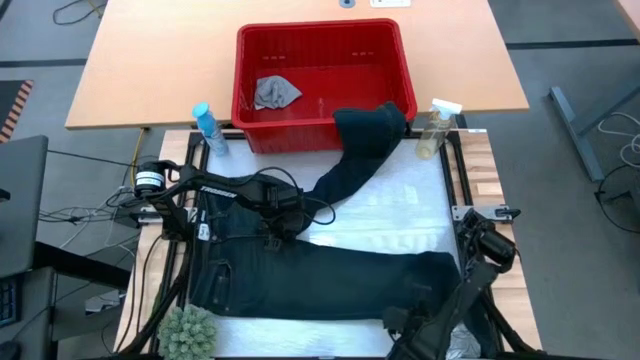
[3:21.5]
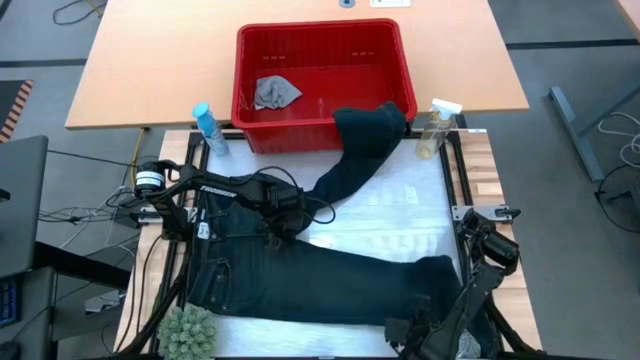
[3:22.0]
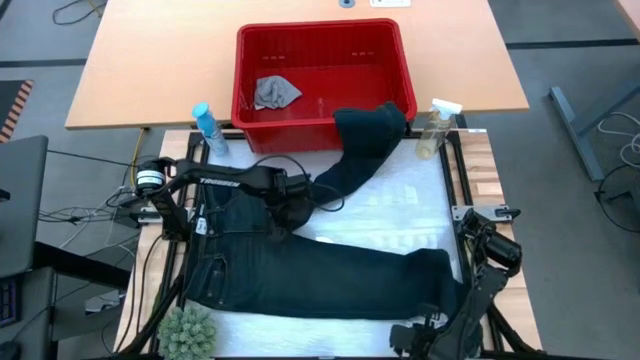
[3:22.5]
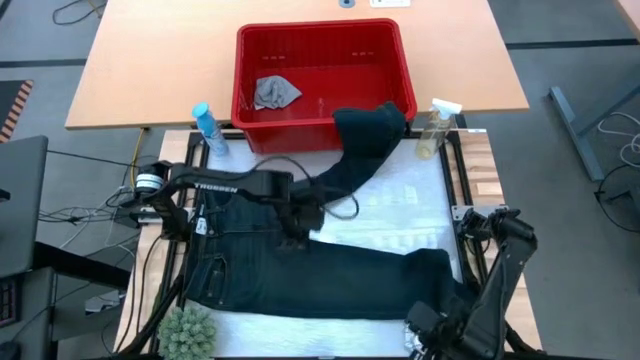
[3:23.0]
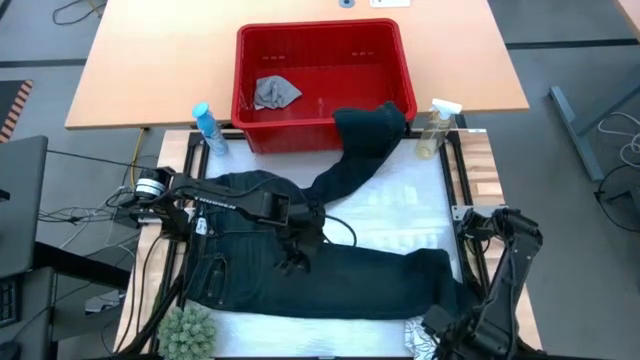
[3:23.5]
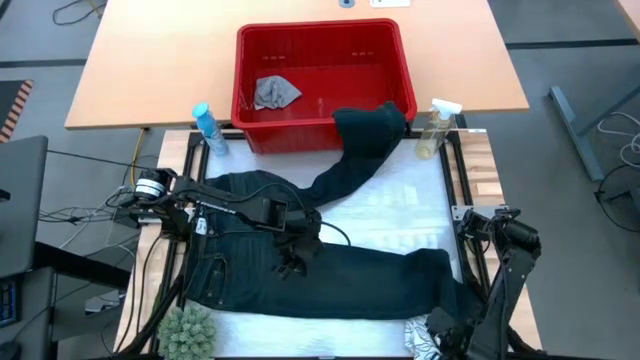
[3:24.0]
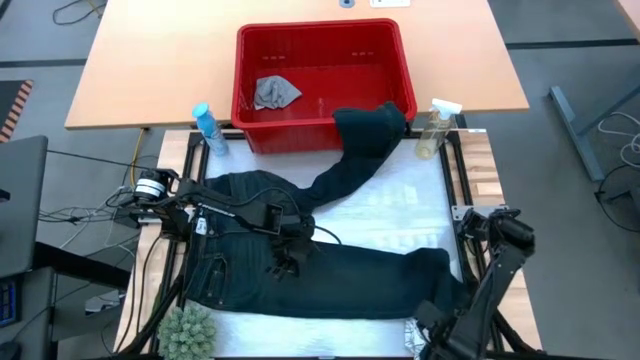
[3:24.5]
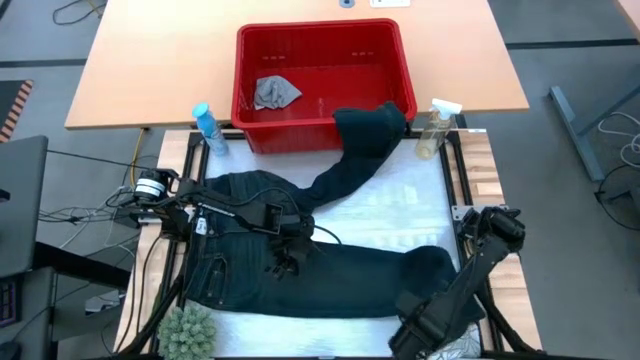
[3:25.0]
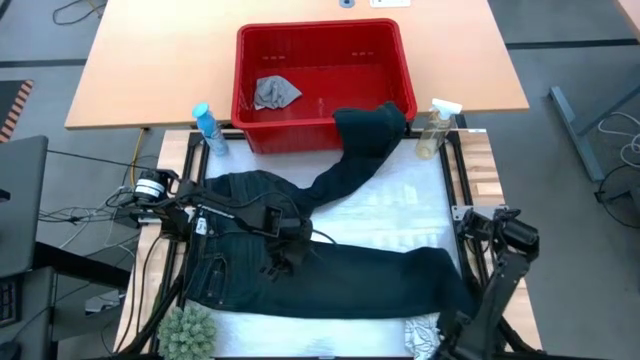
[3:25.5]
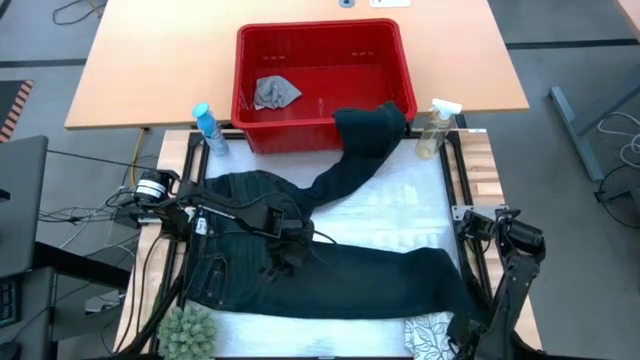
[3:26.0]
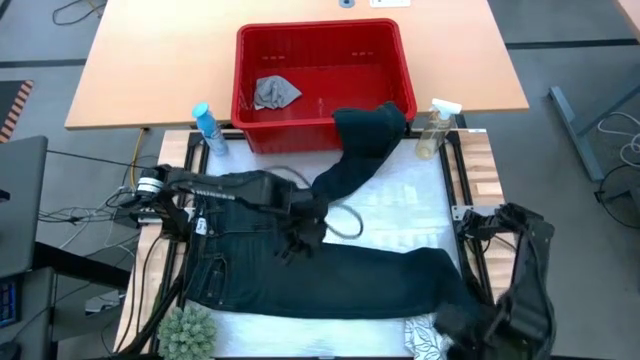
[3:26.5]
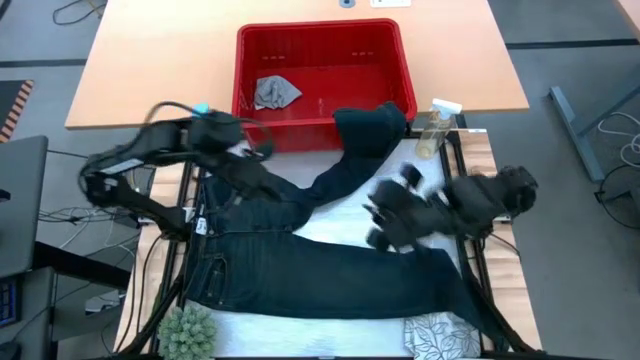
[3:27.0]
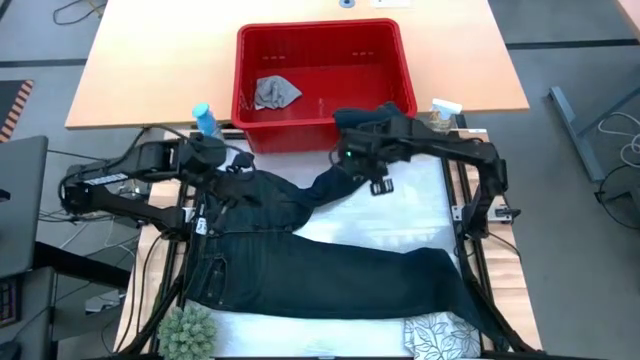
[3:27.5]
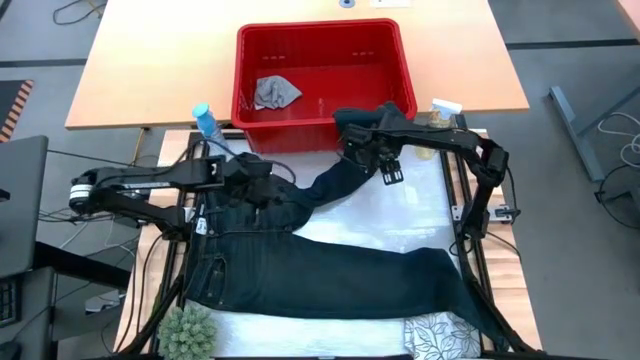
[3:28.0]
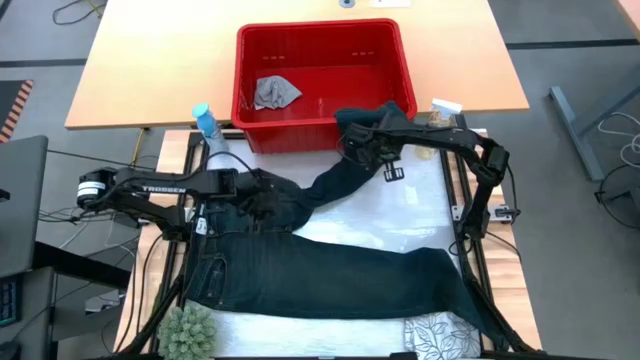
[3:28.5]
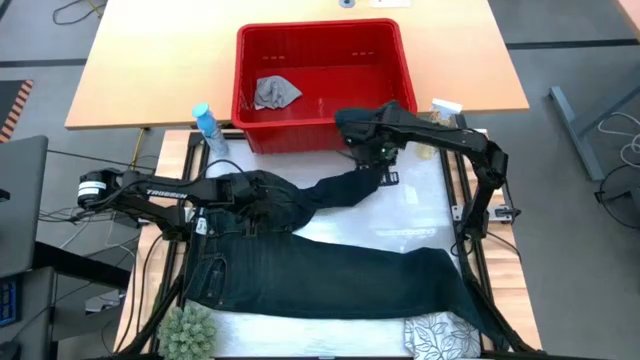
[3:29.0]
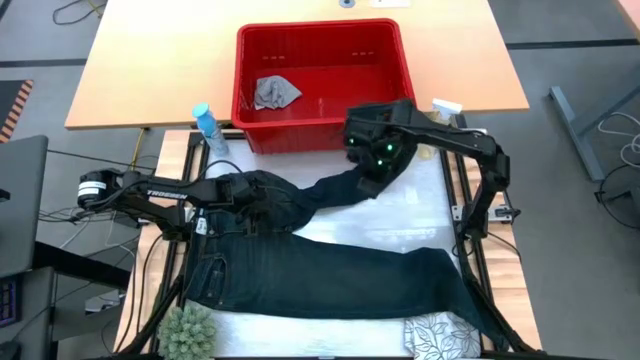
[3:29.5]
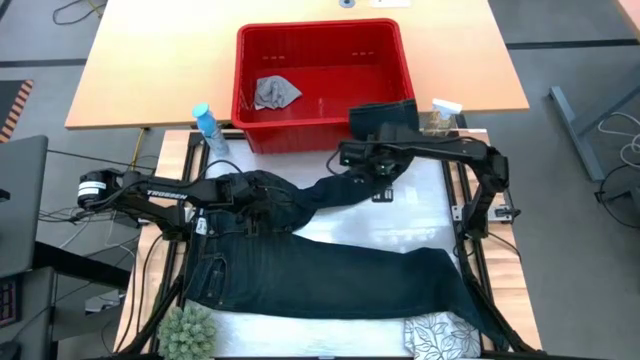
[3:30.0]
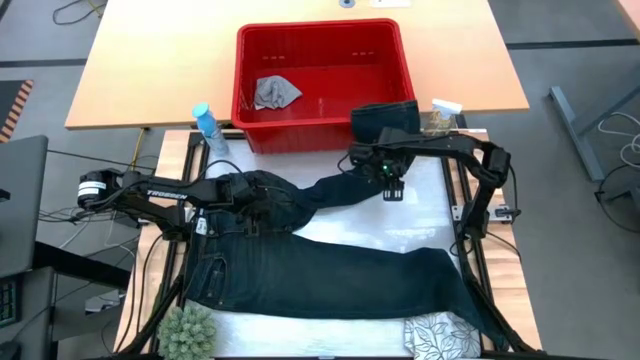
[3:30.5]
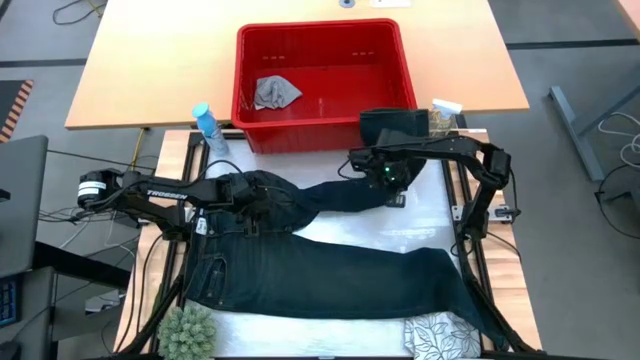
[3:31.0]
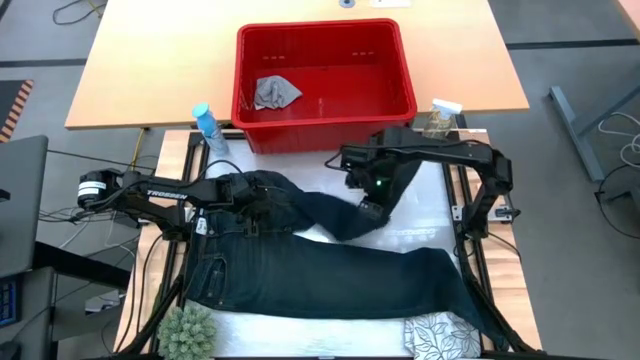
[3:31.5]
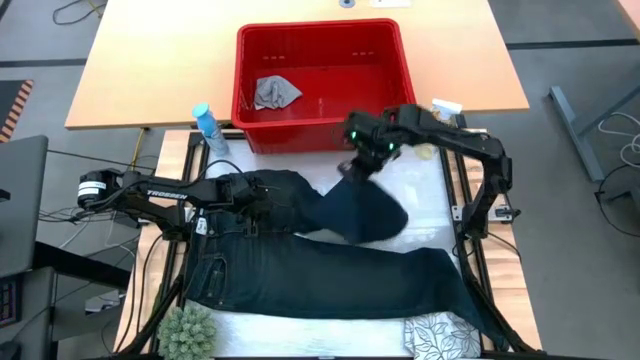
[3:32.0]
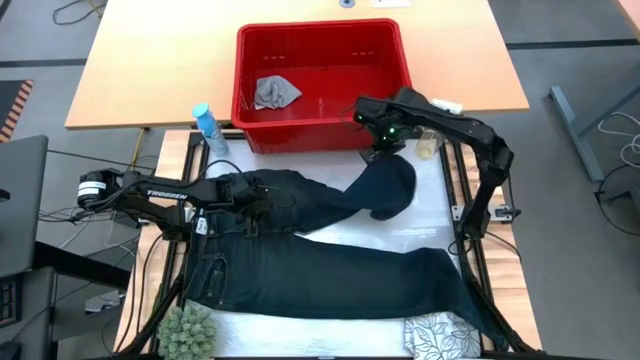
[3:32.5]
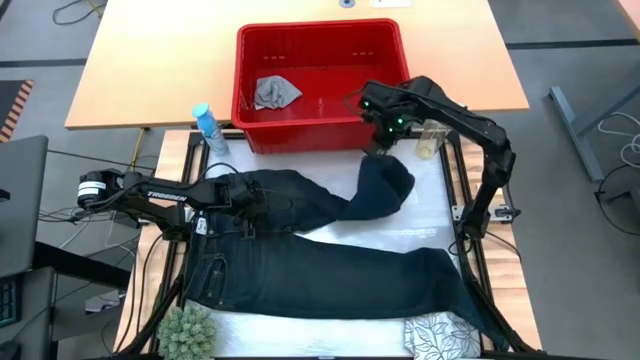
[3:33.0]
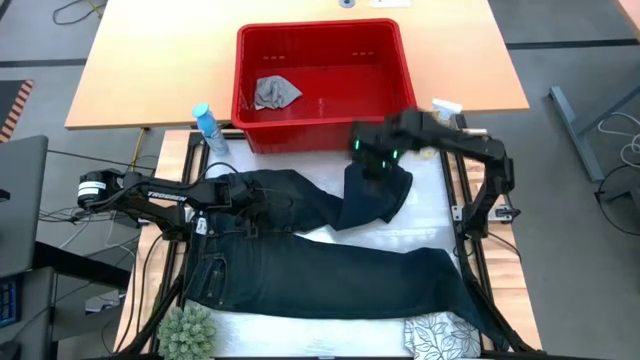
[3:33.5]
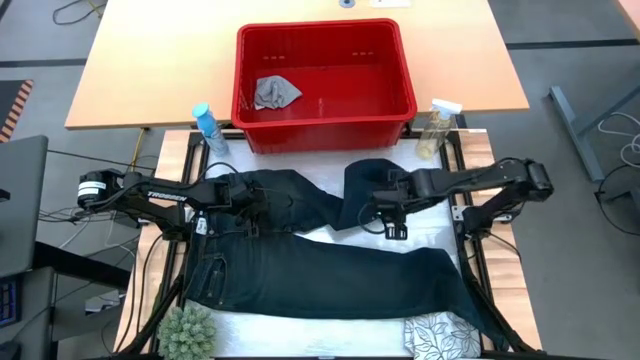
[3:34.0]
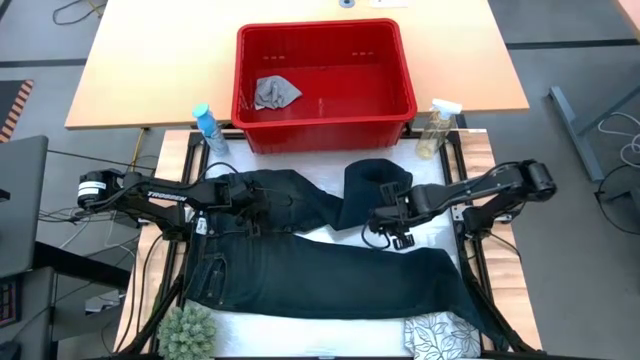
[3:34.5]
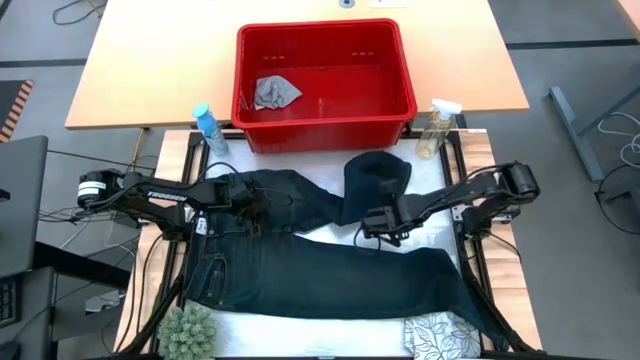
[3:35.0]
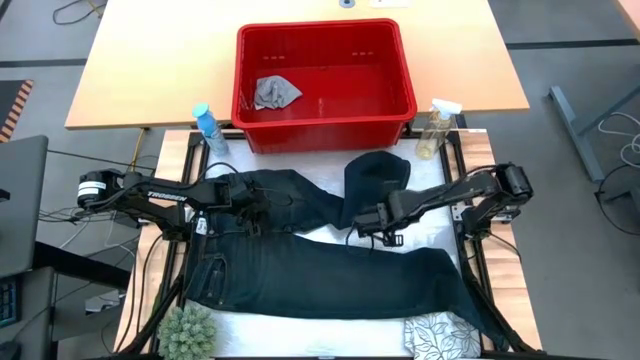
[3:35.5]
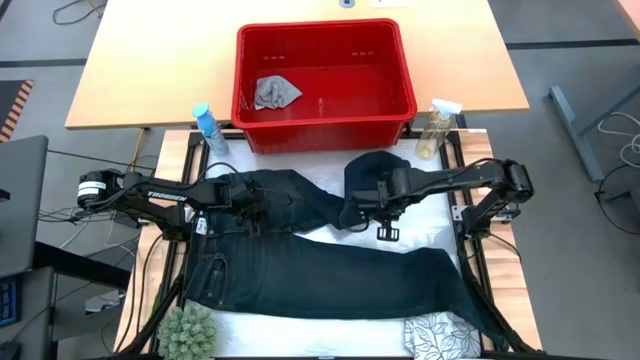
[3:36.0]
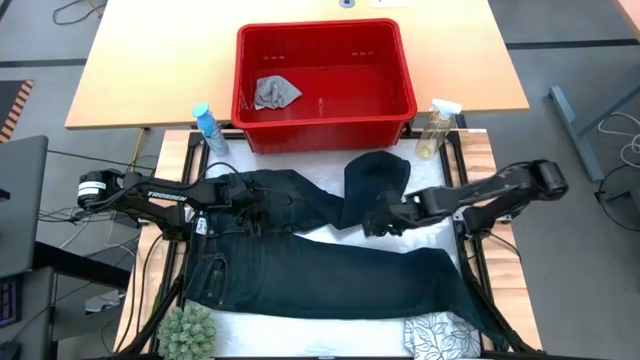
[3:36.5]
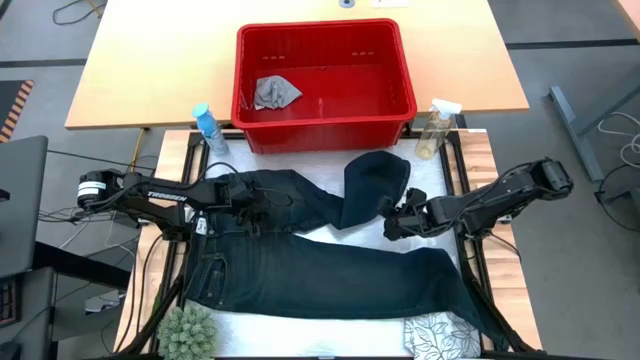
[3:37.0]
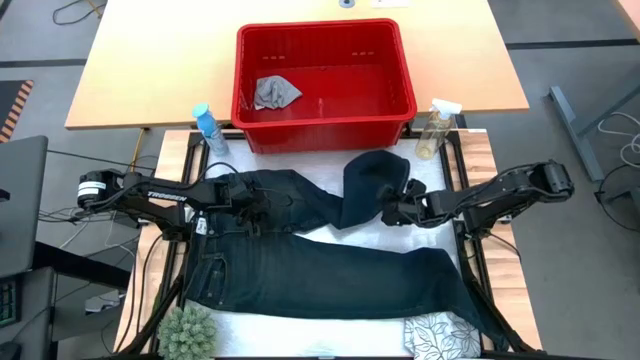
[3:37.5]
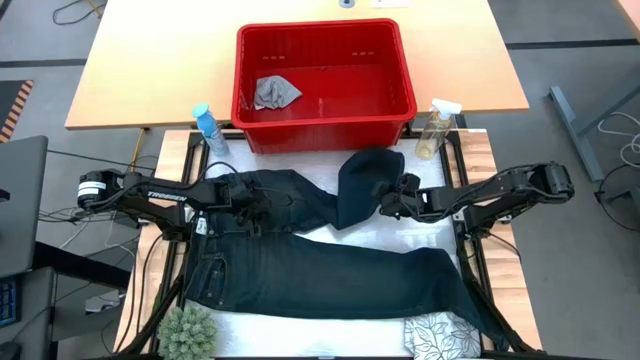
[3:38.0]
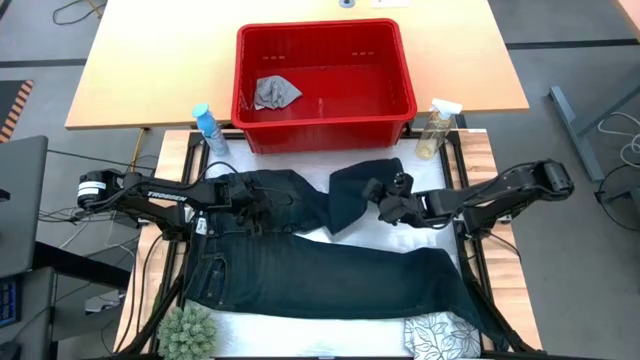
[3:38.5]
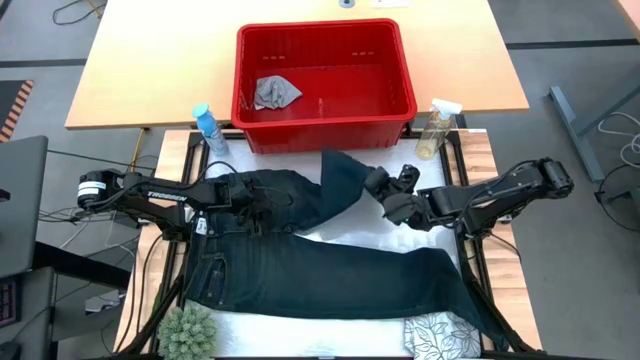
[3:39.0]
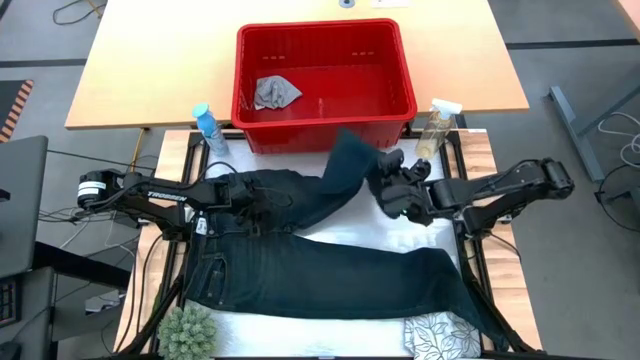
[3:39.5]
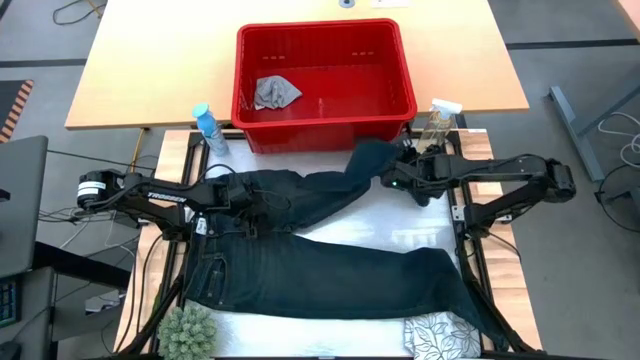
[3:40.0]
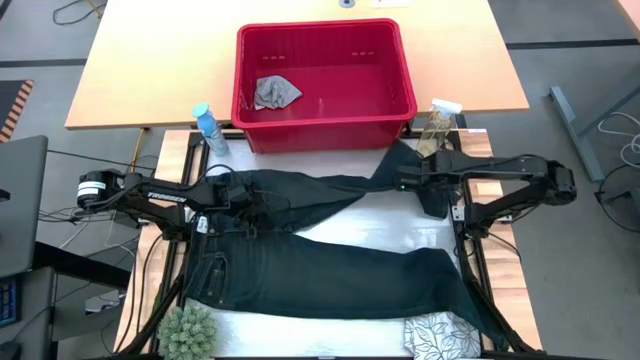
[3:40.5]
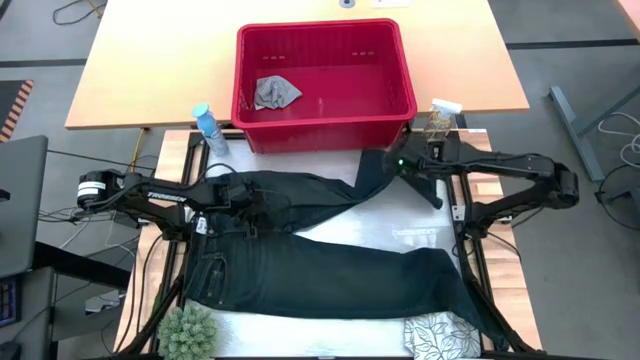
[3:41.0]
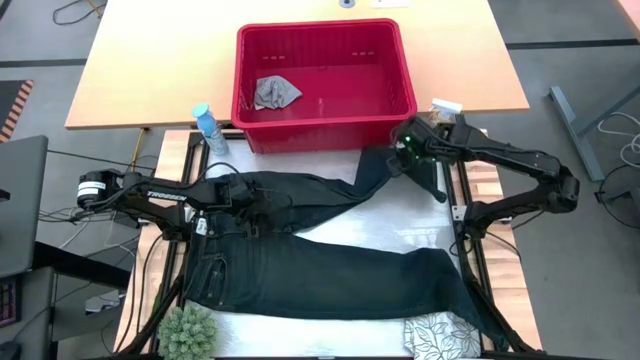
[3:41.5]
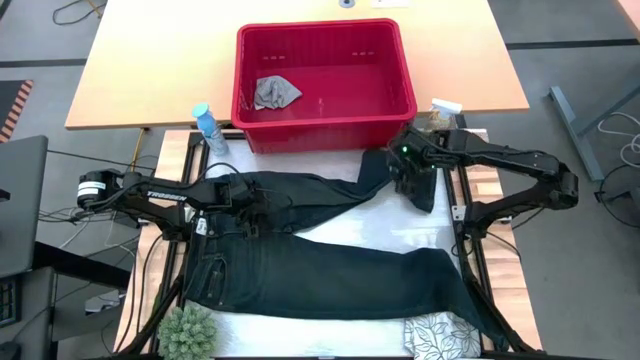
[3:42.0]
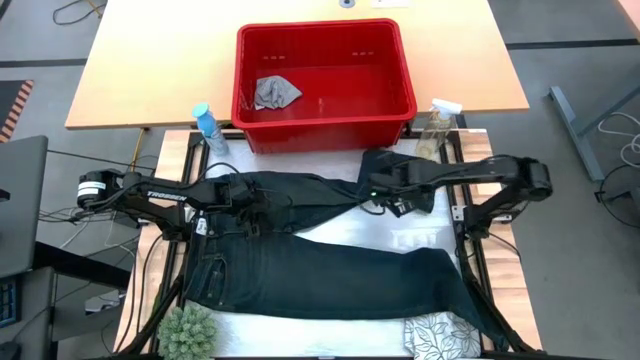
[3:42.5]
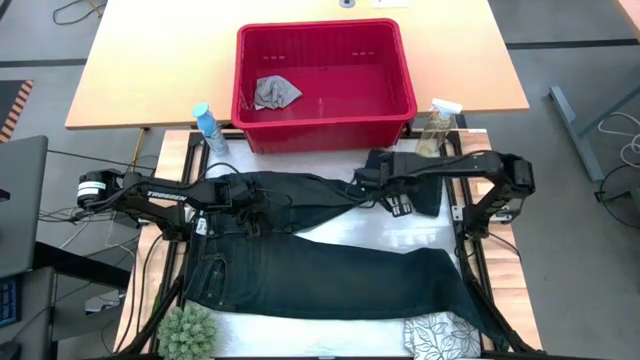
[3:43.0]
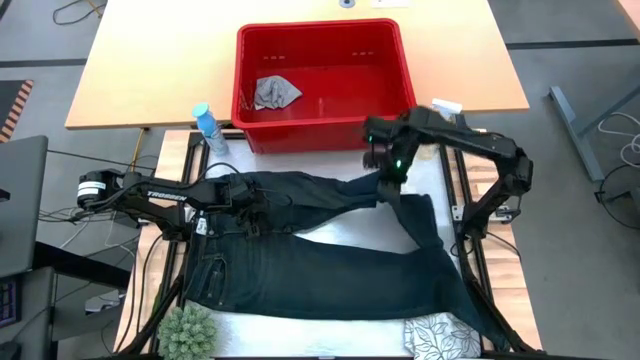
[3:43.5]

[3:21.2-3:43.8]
Task: Fold laundry
Fold the dark blue pants
